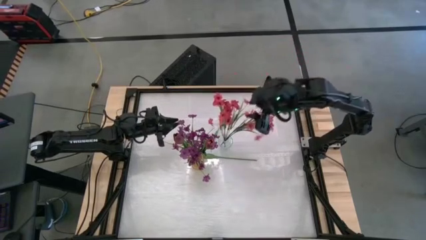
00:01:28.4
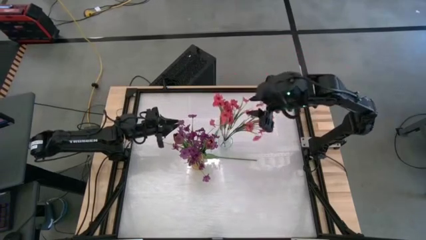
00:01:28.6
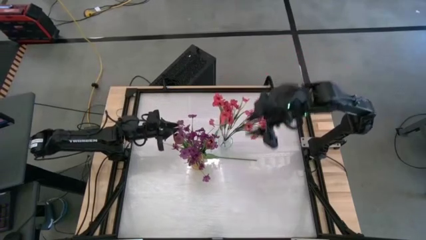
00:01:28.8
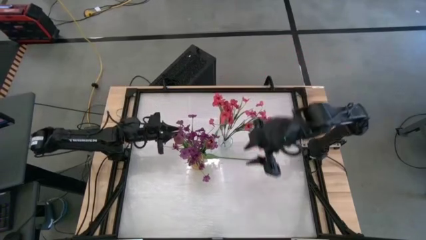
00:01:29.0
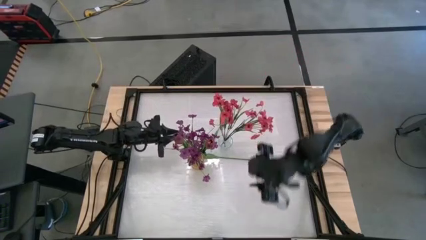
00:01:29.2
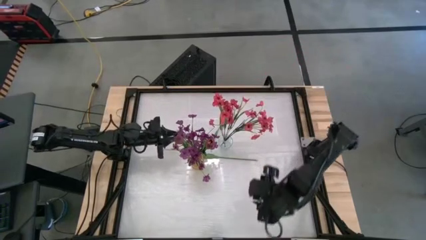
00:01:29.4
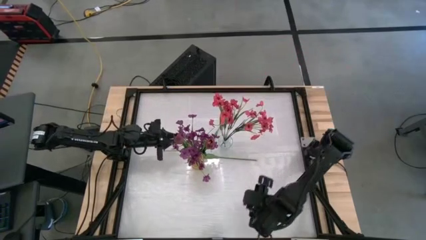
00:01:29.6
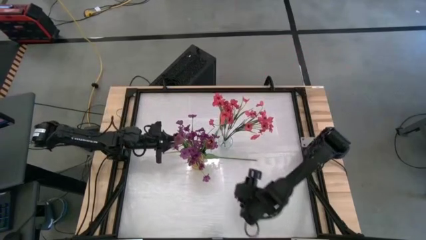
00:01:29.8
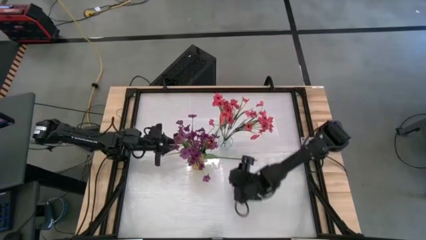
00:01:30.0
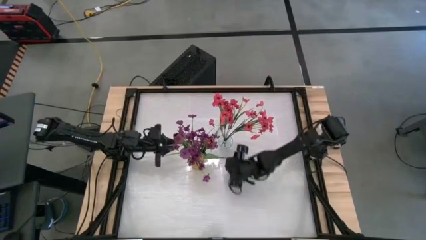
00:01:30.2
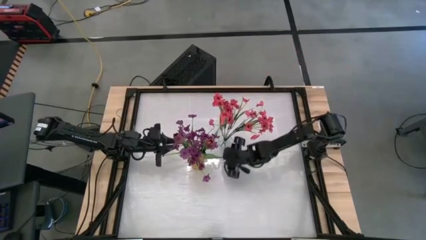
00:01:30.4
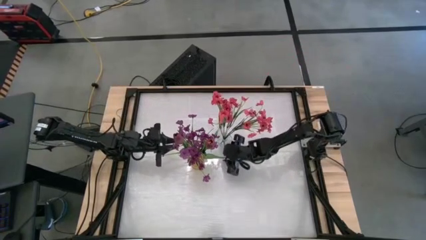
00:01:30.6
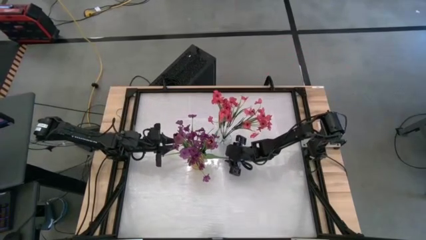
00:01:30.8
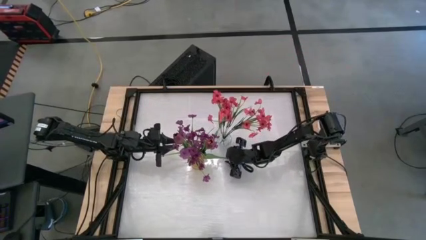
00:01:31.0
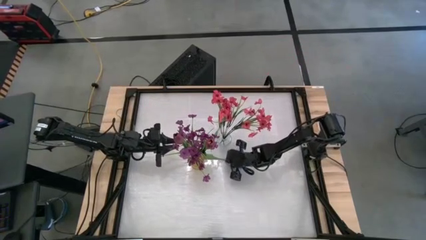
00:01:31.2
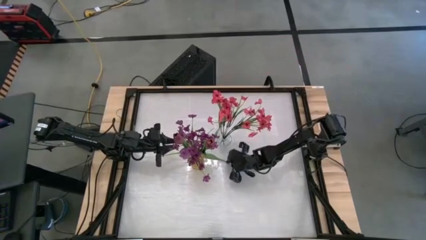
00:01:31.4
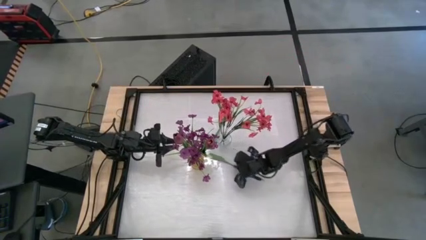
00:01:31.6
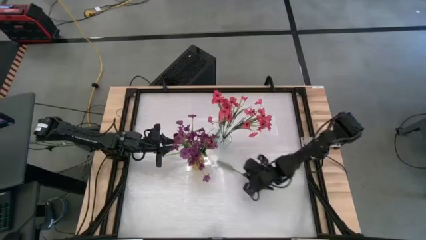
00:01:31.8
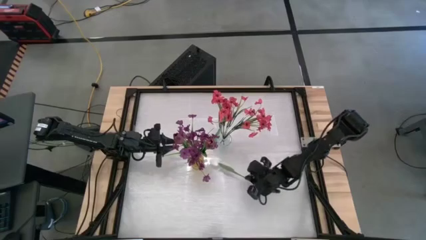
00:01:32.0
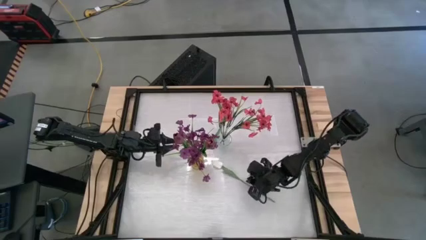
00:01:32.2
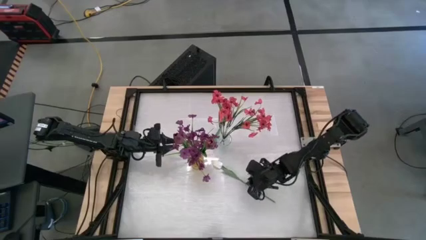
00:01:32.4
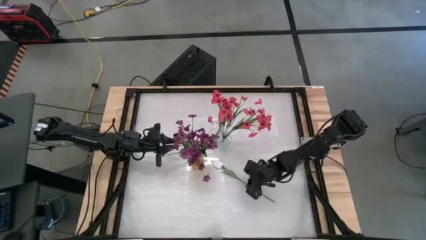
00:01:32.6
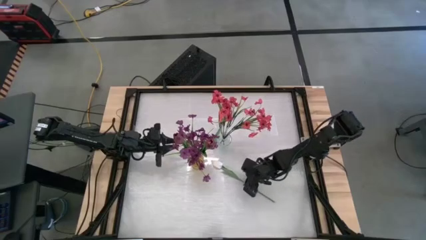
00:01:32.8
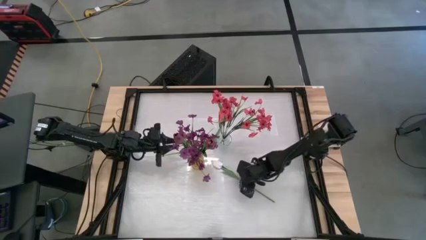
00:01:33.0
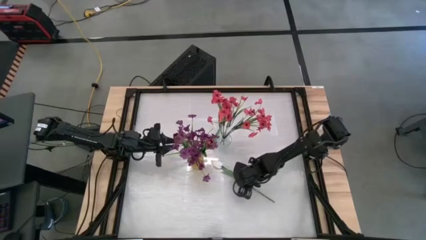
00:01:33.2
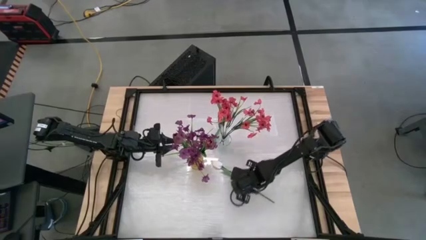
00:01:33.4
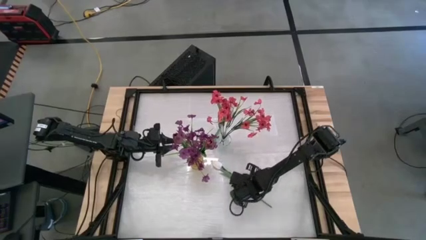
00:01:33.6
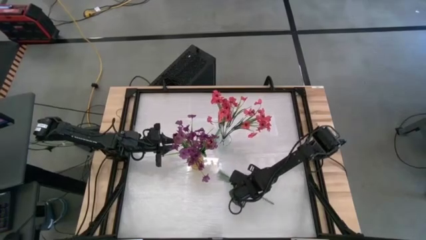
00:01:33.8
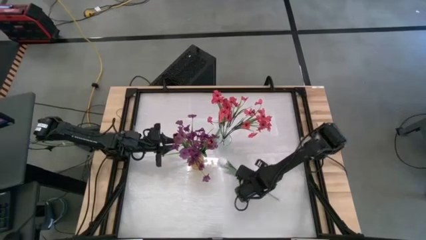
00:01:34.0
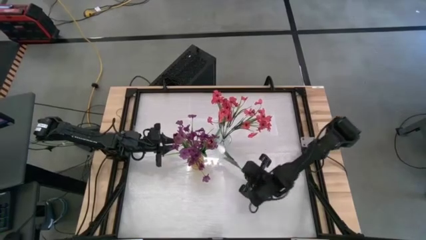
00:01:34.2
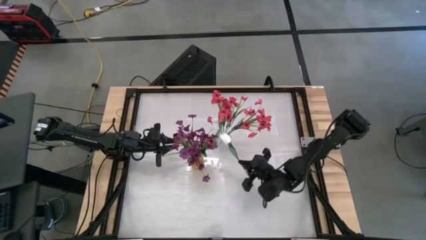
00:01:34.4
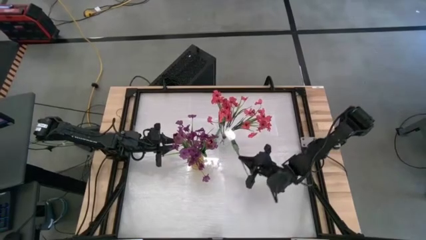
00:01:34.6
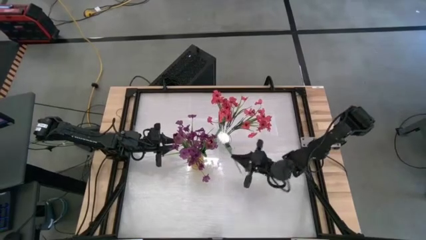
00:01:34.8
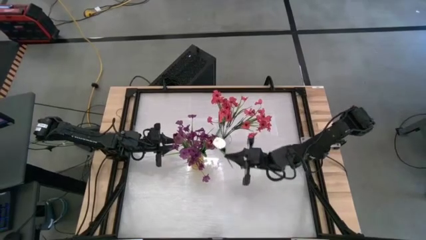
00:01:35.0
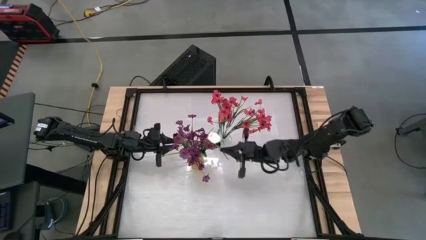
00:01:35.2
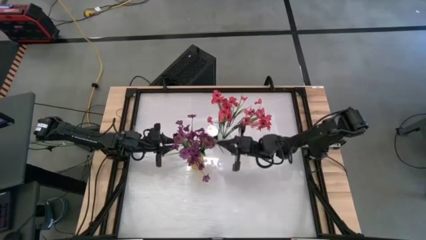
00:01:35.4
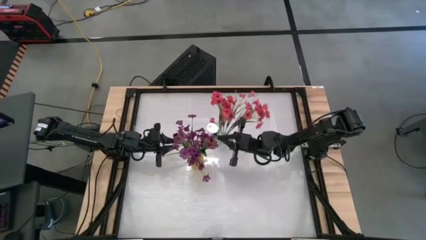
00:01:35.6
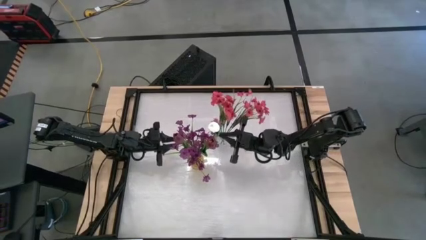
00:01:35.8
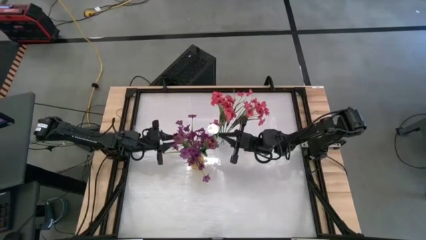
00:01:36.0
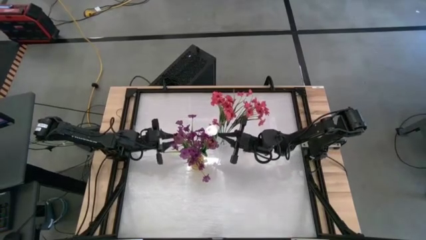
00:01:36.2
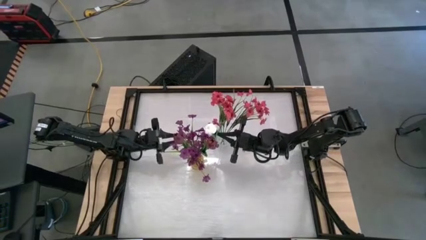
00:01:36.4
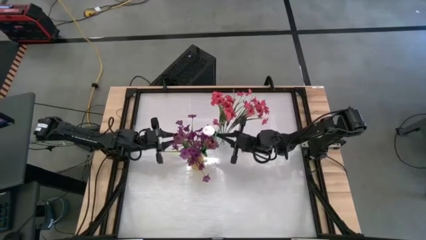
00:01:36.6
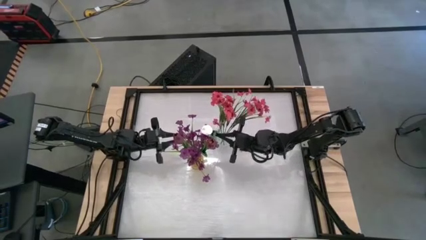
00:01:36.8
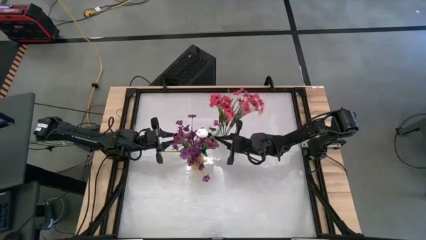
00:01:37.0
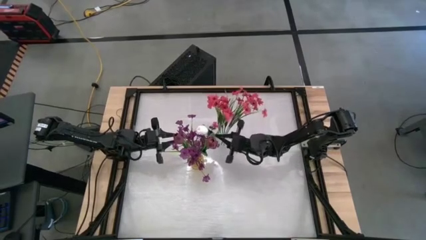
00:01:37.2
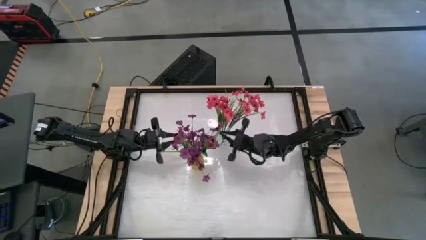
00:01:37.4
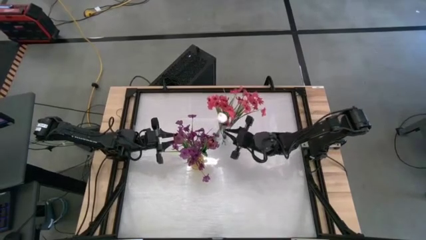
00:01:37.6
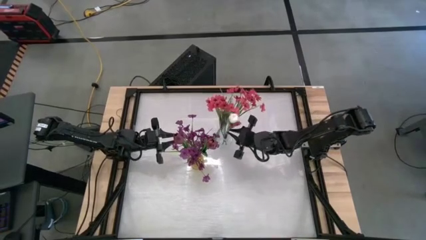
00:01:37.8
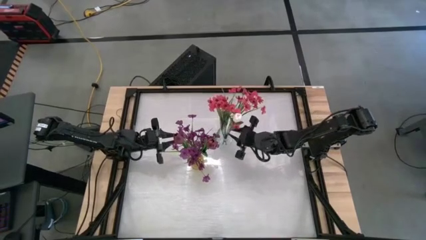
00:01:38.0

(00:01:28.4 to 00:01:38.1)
Task: Sort flowers into vase by color
Put the right white tulip into the transparent vase

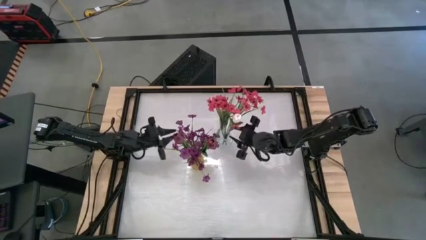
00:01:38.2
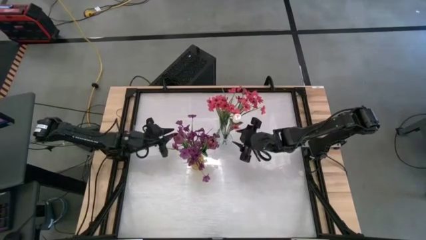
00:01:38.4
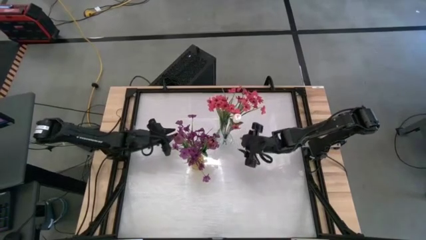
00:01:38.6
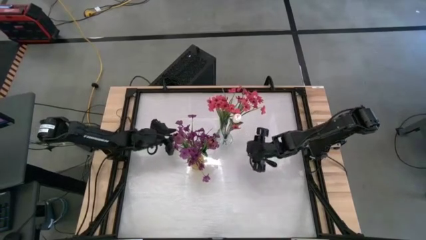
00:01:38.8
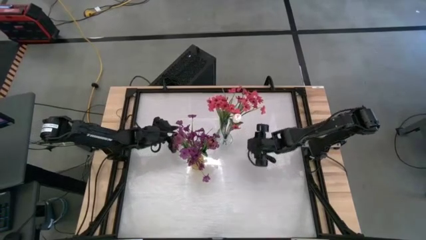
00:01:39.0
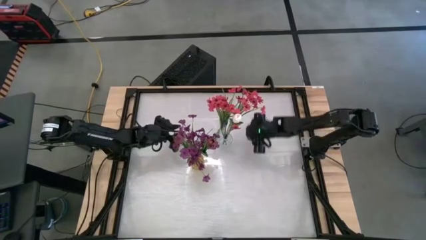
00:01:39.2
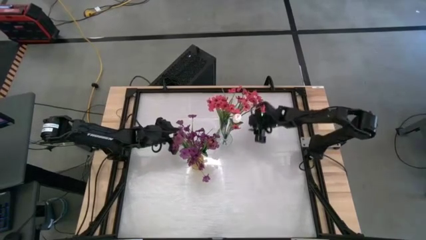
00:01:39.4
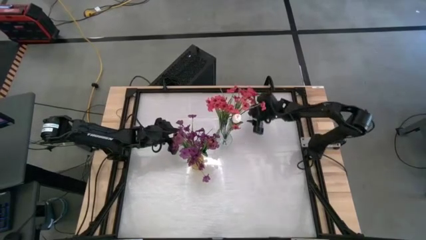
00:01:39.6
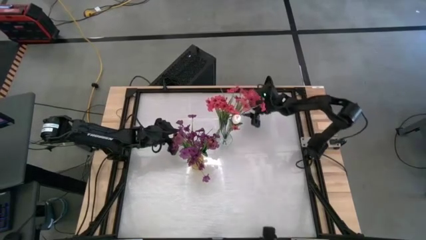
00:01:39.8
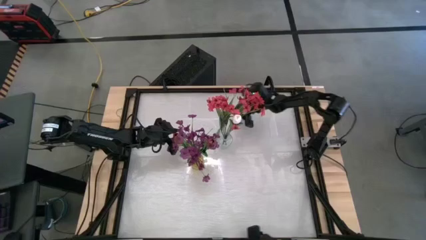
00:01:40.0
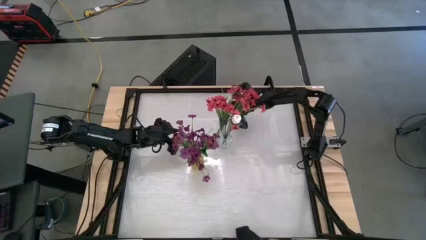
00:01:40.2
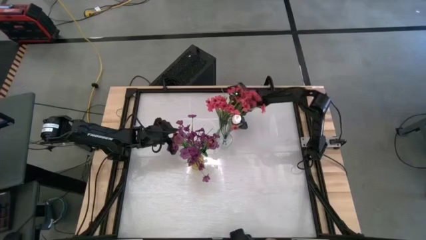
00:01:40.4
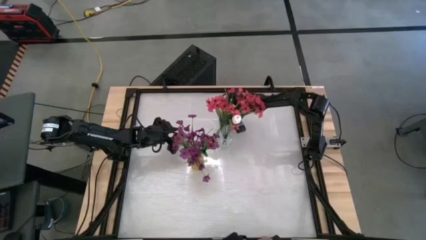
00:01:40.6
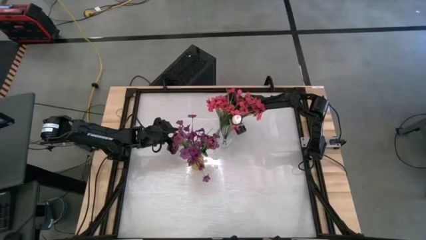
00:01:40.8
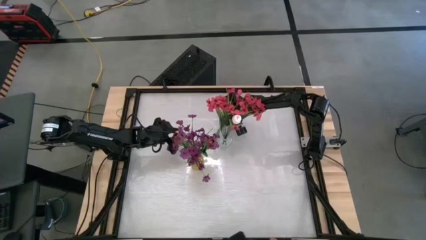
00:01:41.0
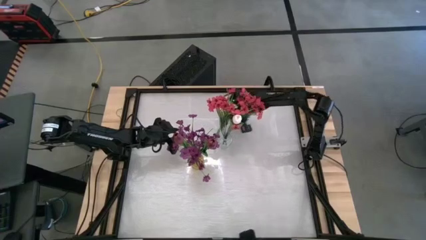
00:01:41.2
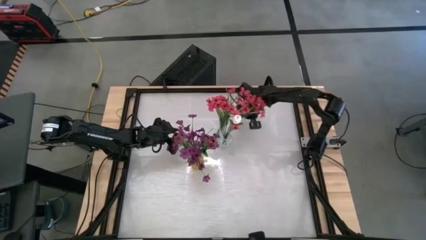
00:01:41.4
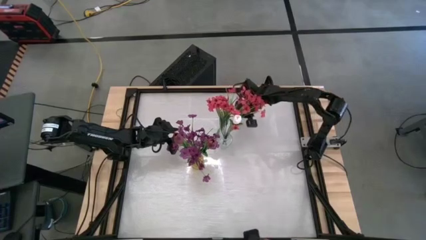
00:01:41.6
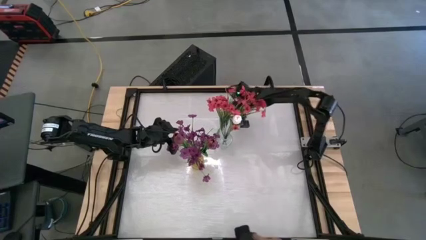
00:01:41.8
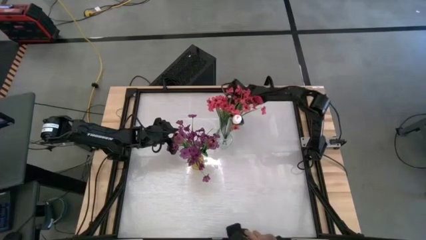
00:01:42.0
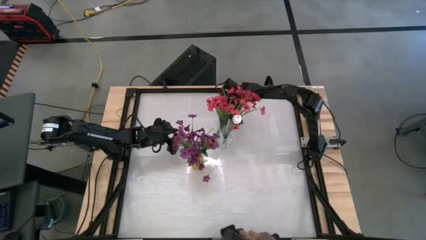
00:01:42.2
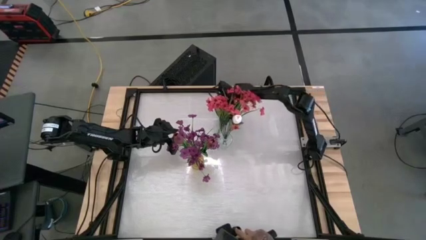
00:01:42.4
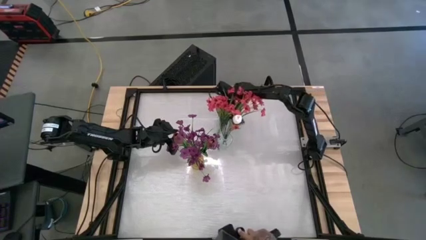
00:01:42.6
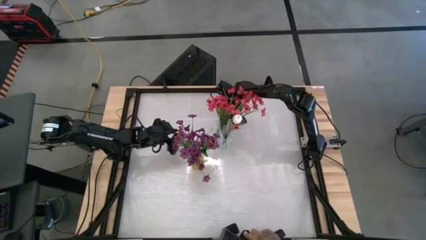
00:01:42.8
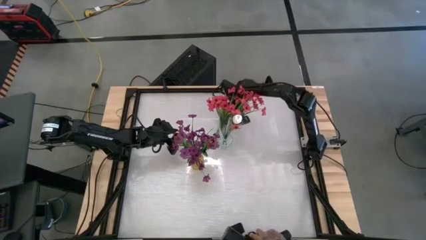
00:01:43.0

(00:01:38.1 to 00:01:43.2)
Put the white flower into the transparent vase

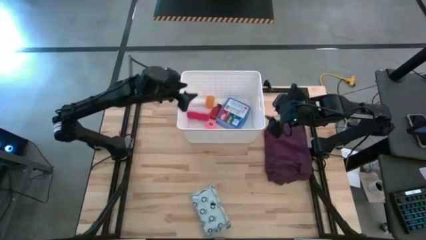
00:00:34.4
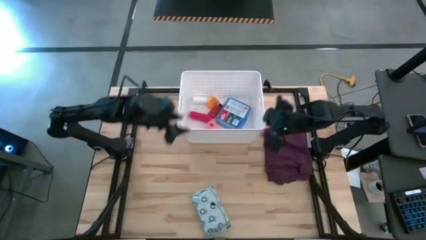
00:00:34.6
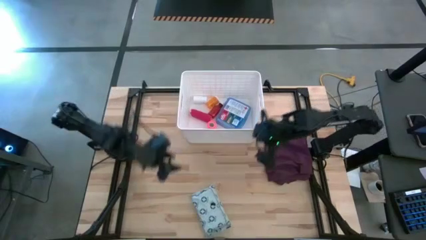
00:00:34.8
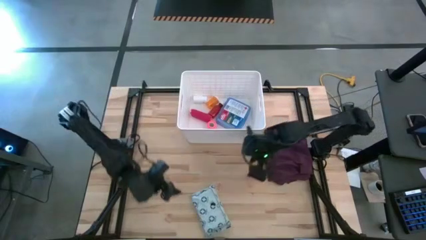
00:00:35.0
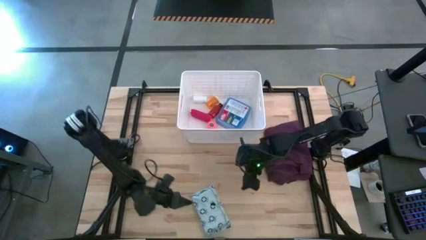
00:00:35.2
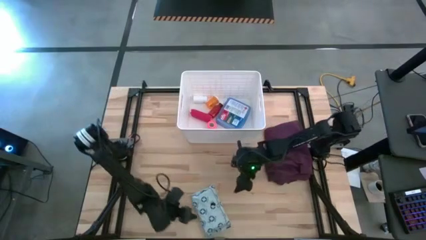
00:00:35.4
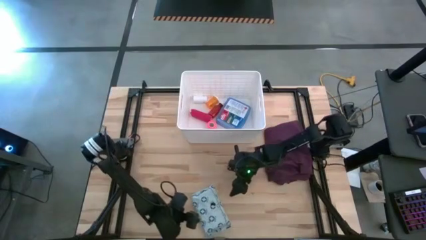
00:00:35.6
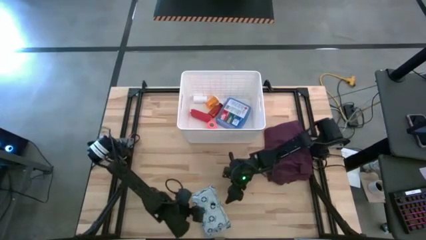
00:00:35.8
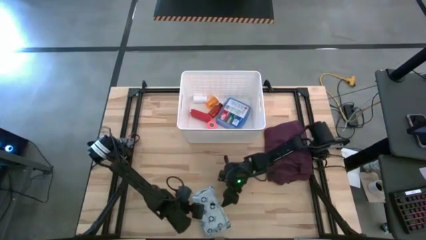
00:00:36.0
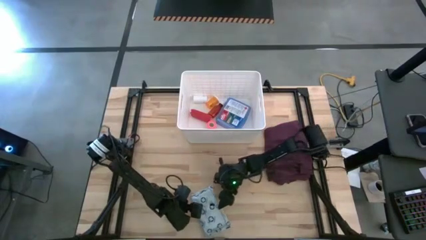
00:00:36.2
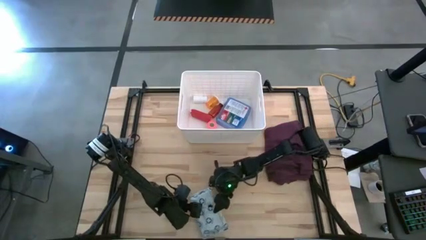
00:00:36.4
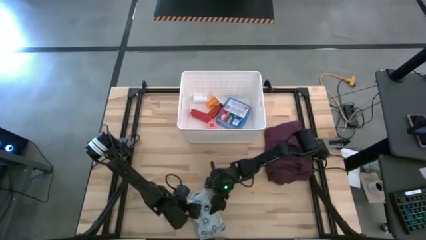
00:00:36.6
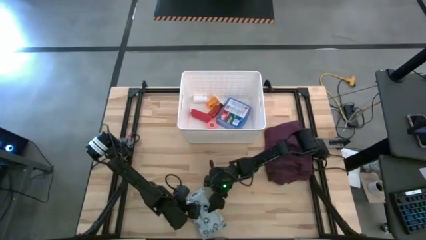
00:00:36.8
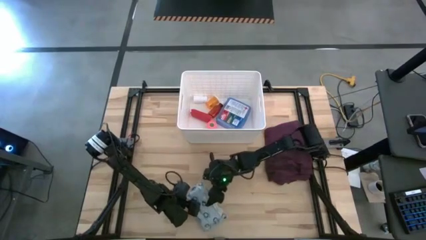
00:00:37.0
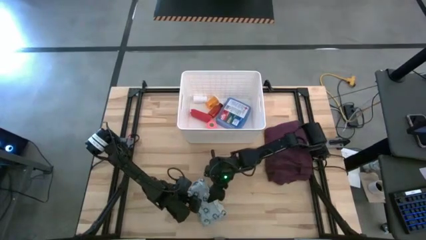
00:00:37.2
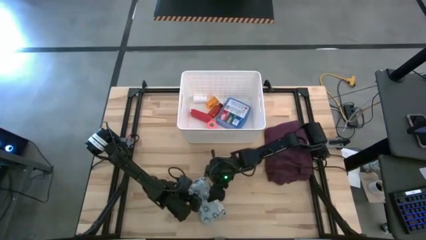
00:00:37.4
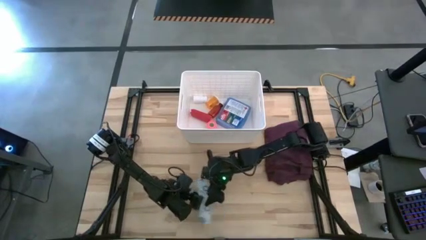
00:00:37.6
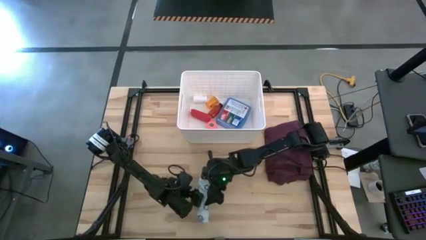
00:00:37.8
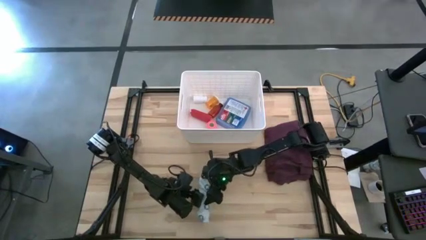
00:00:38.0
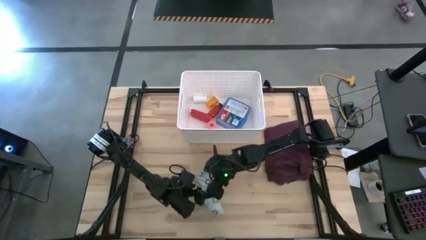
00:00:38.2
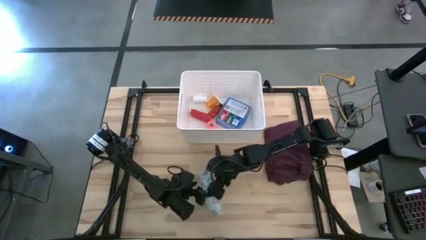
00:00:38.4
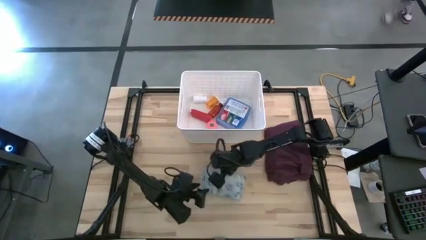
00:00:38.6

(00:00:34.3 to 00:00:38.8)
Task: Pick & place medical supplies in basket/bin
Put the mailer bag into the white bin
